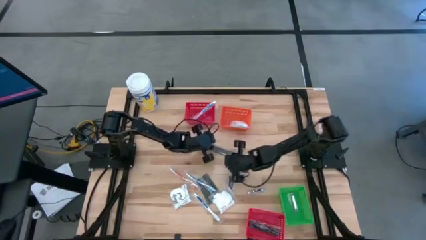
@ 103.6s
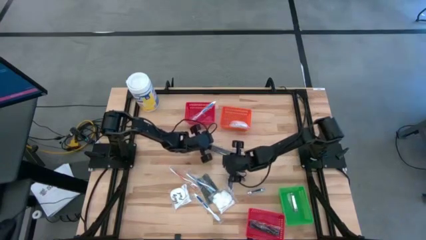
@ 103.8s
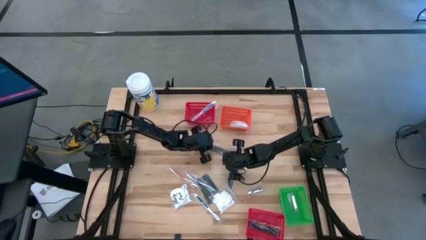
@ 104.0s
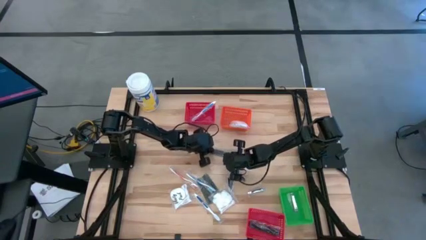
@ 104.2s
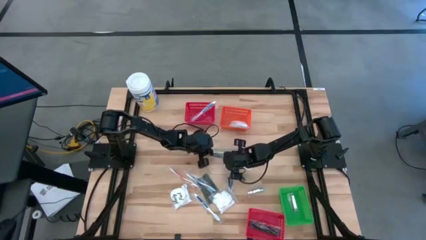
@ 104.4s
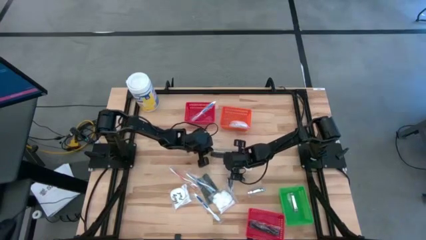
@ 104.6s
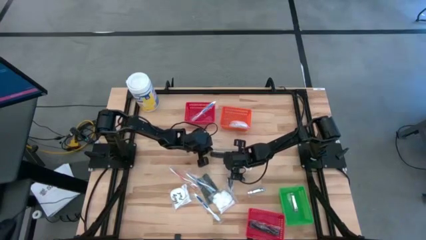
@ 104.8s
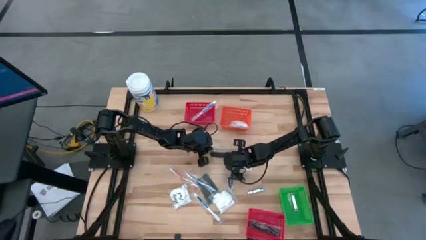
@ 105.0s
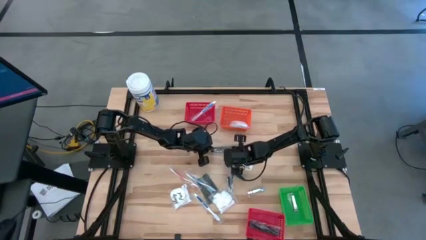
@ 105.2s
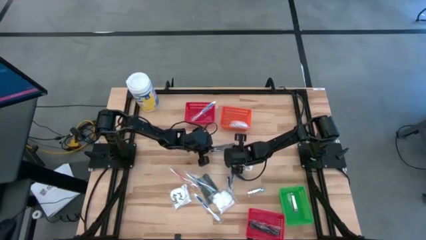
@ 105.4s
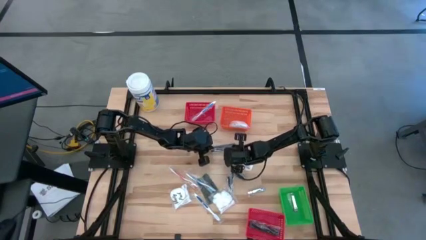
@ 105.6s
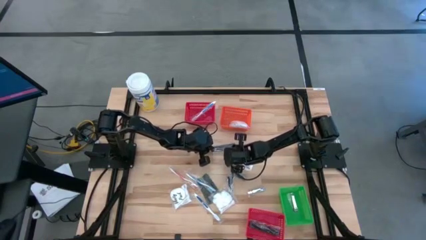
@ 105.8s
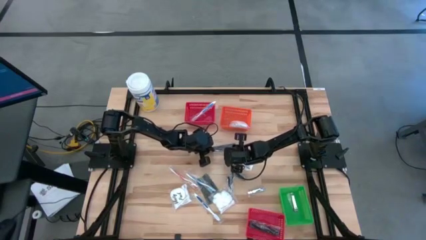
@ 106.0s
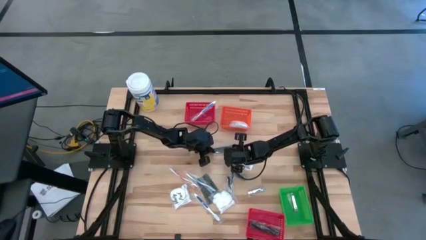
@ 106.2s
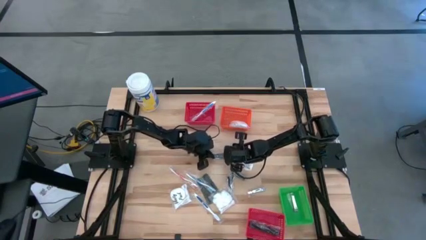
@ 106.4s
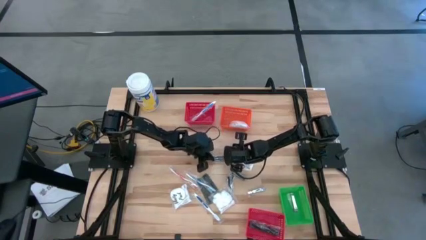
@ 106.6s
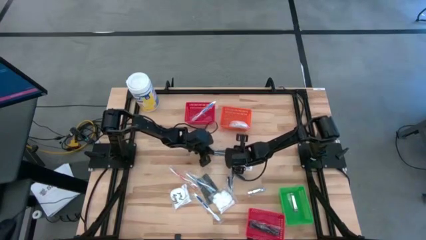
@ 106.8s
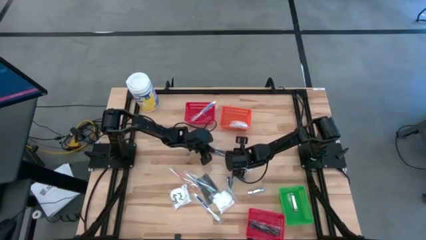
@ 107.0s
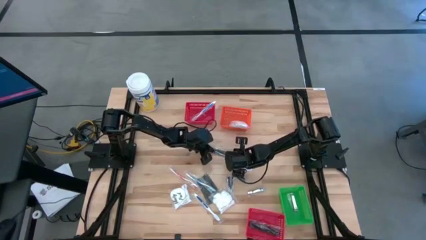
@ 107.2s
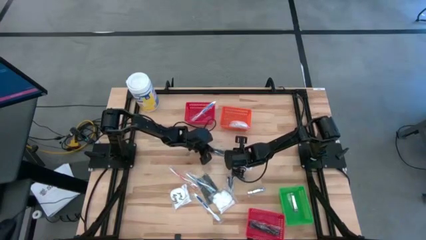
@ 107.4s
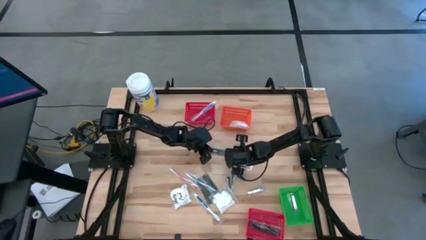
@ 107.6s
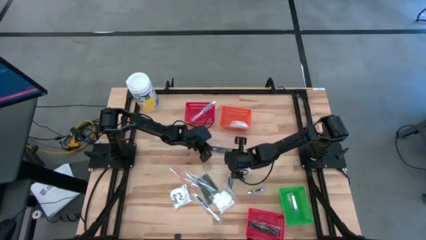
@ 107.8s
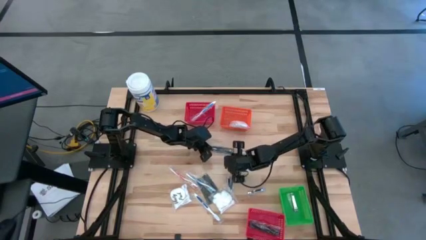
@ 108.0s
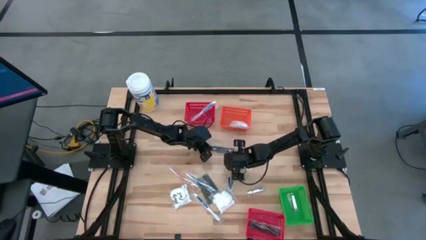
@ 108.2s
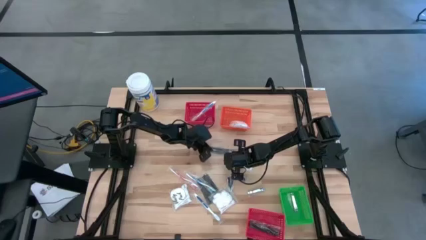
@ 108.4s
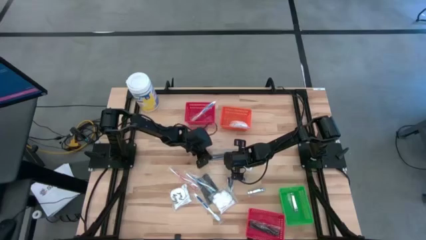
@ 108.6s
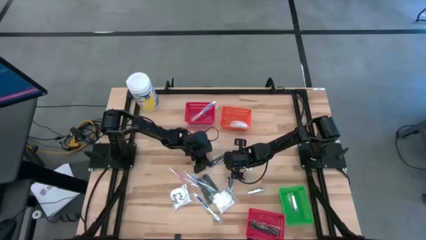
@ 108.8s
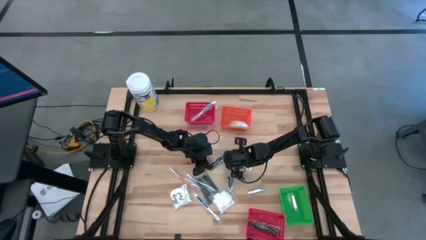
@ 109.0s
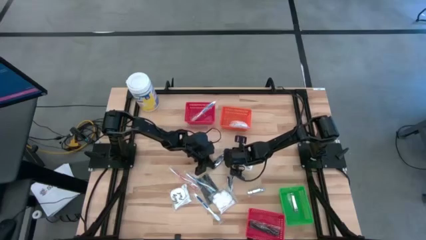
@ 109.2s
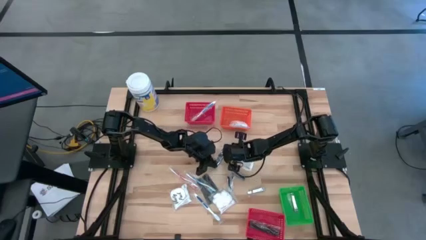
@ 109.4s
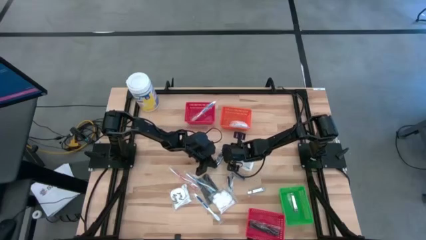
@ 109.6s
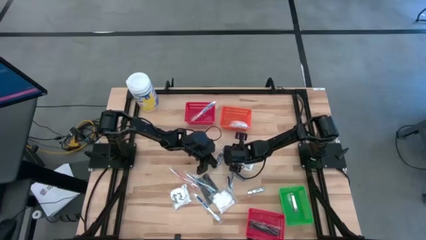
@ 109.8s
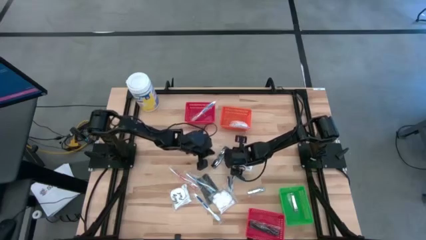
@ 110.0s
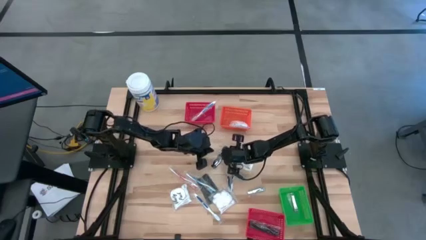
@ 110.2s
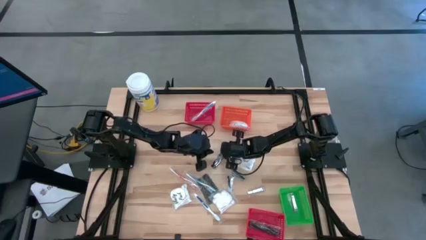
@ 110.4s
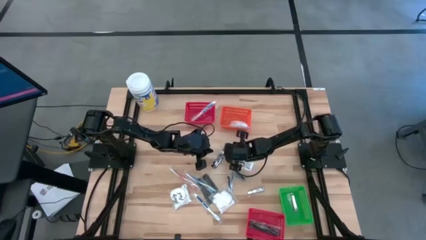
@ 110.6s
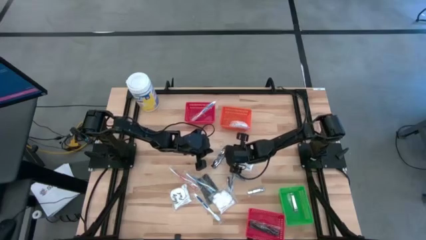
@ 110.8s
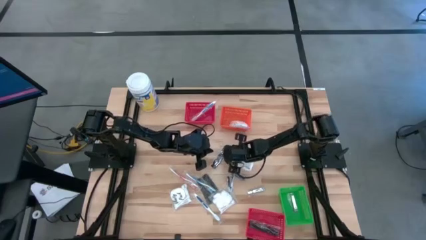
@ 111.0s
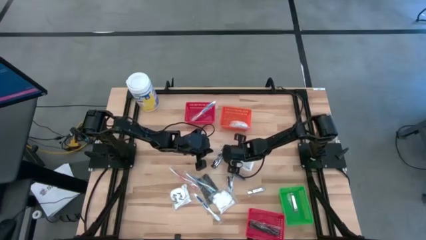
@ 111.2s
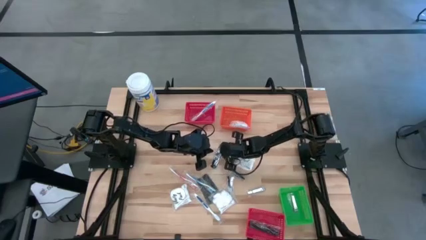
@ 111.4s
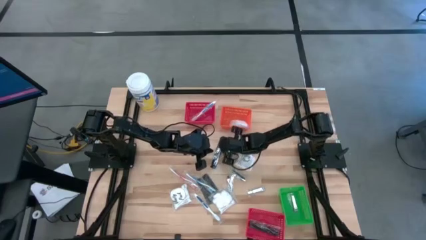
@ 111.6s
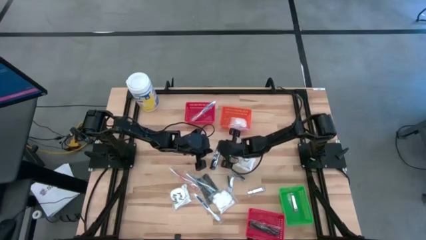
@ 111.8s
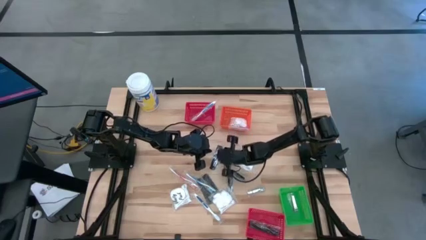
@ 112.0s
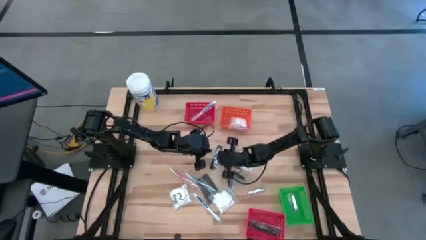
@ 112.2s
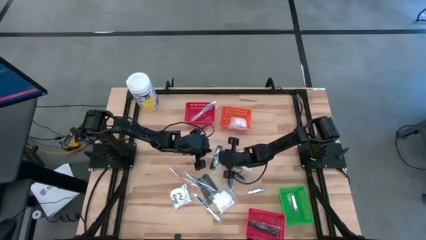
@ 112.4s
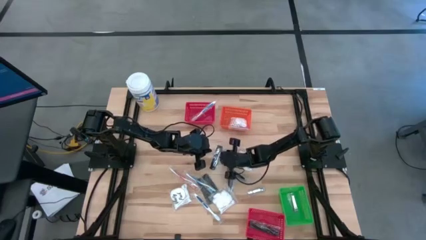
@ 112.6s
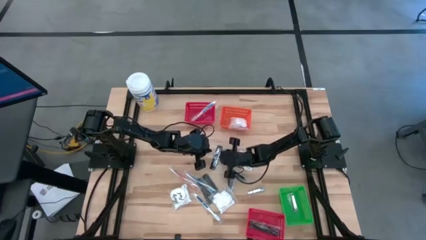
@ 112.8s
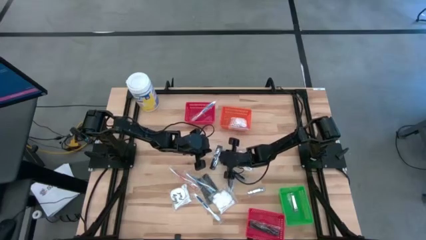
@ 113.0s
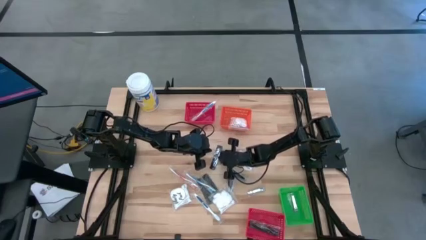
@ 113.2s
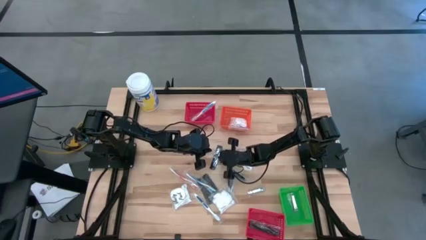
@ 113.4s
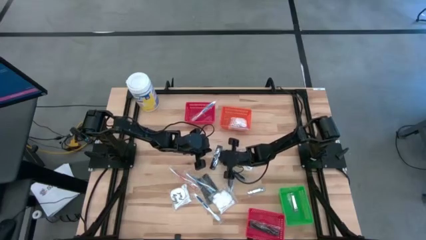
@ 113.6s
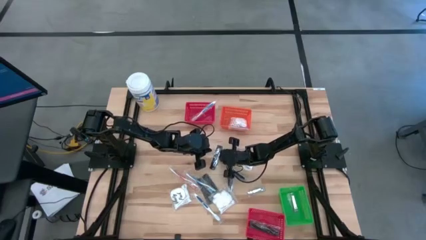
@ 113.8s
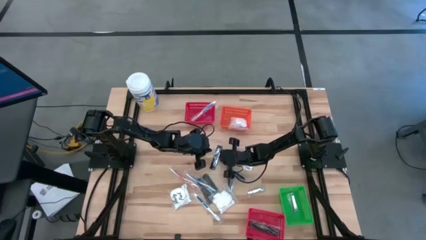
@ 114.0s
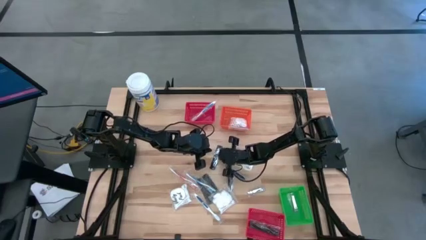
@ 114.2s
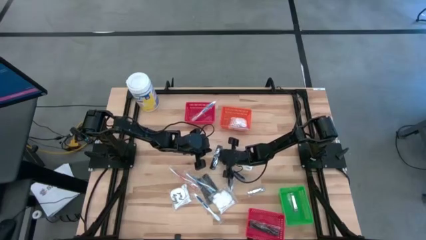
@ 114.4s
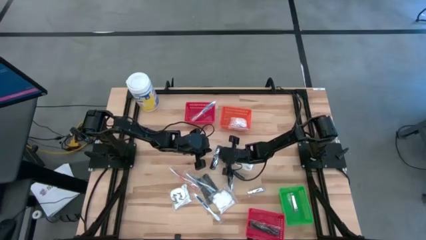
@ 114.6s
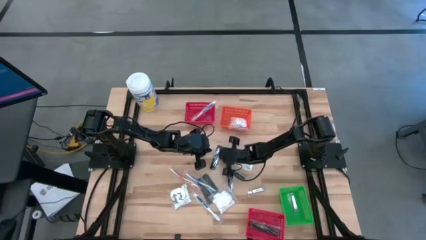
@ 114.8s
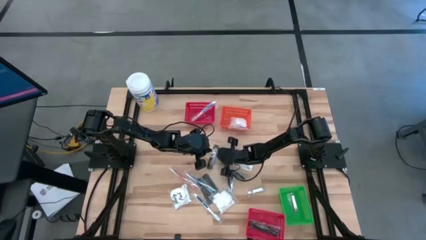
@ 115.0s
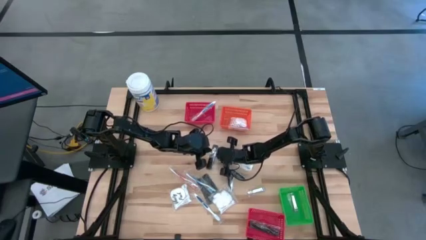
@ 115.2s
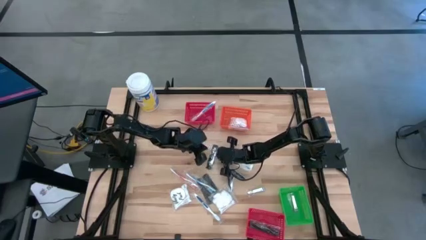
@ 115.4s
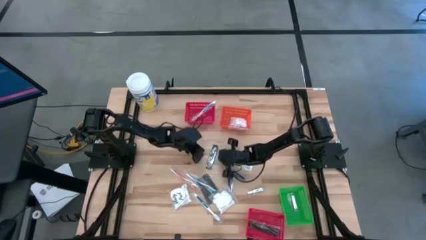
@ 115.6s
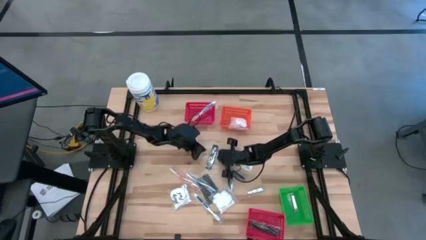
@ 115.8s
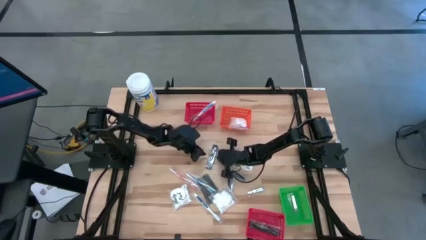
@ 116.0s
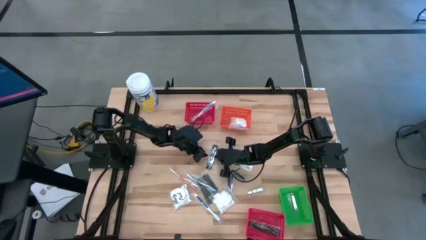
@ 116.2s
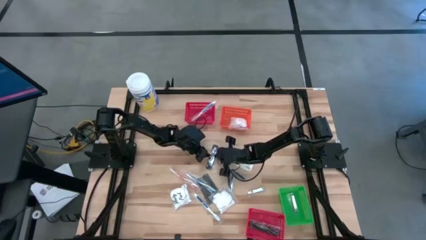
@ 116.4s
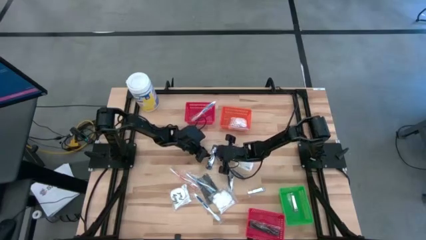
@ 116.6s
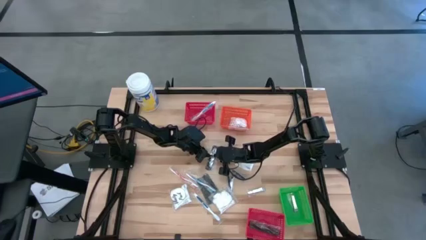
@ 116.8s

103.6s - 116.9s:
Task: Pick & Place Travel size toiletries
Put the black hair comb into the bottom red bin
